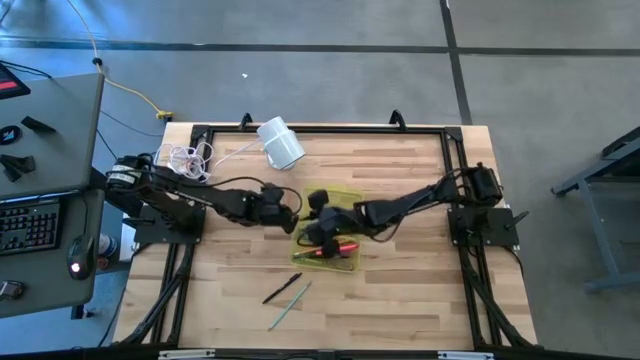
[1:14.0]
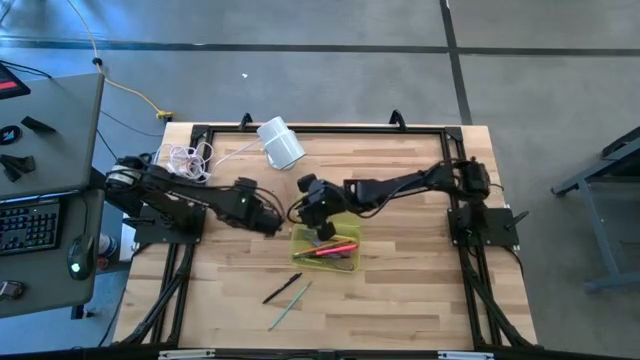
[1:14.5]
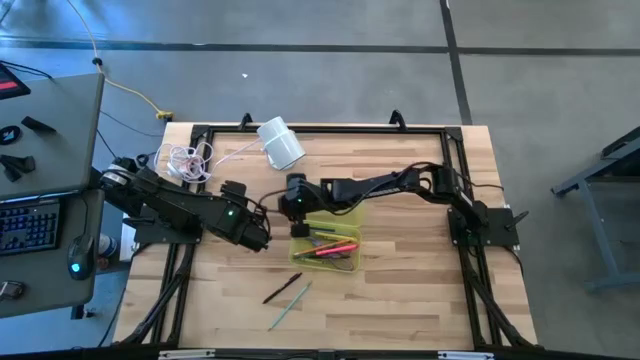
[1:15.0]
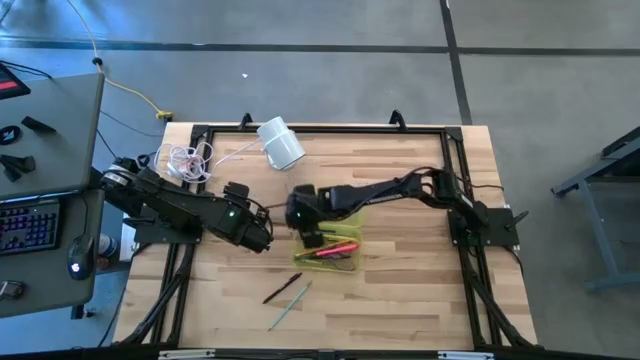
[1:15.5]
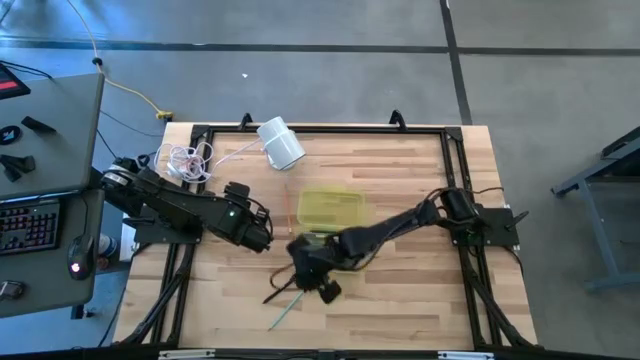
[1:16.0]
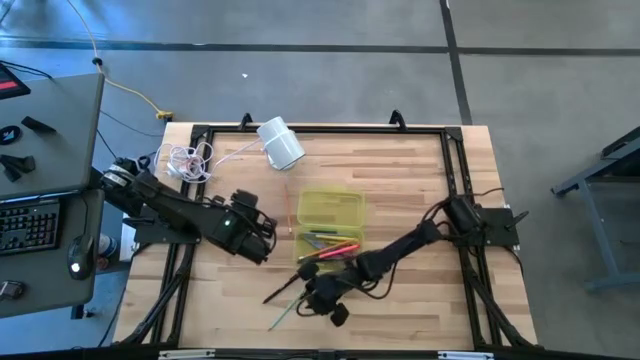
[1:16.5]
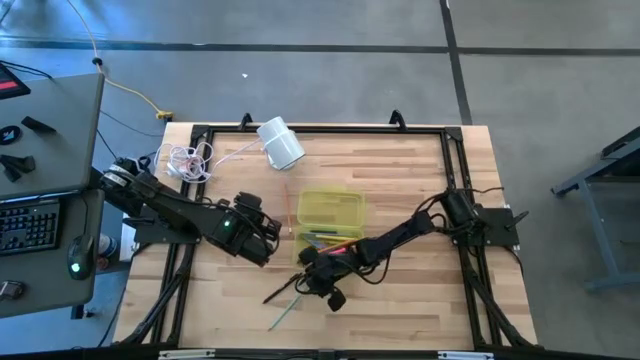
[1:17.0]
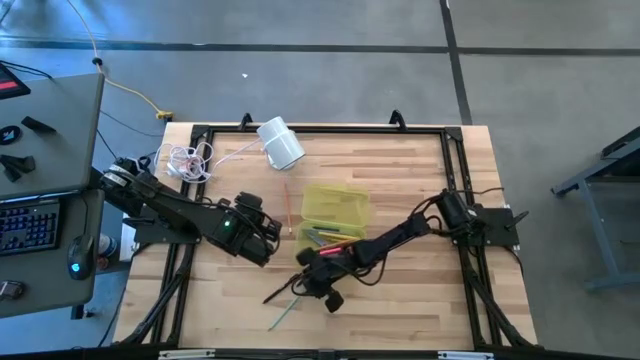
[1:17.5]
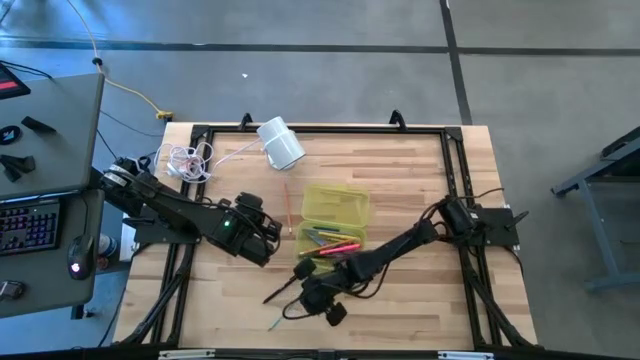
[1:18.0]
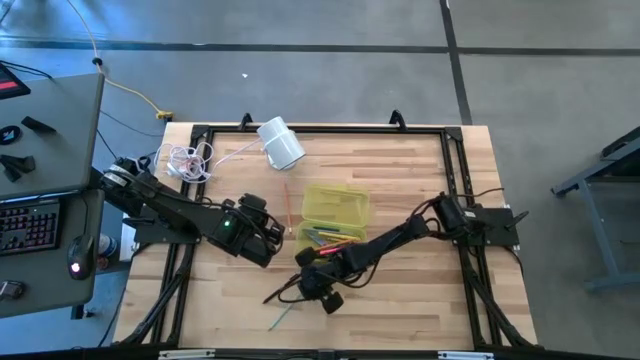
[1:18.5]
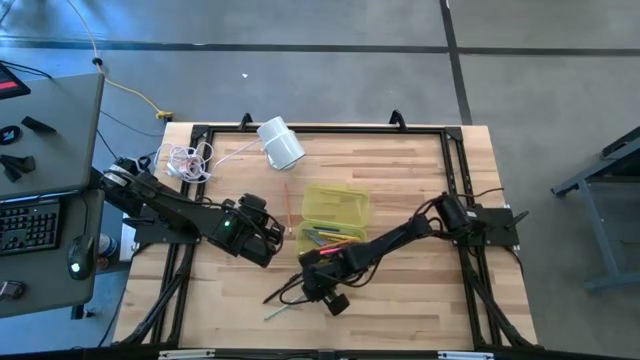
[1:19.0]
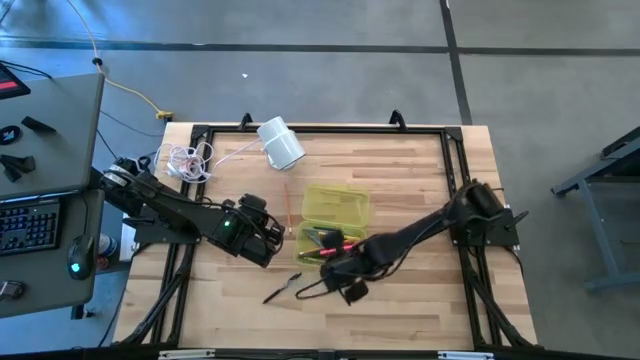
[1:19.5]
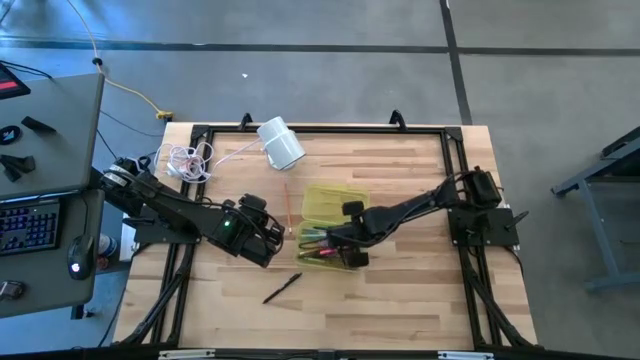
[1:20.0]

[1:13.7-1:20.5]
Task: Pick & place school supplies into a supply box
Put the light green pencil into the supply box

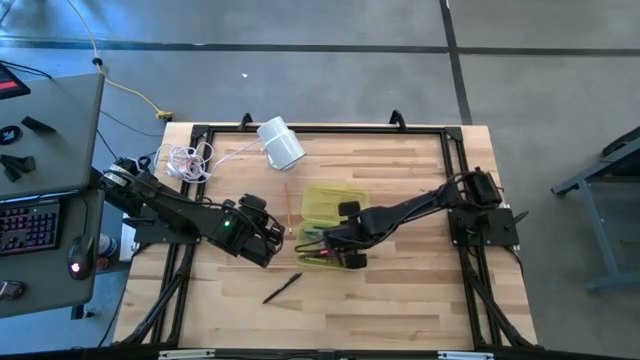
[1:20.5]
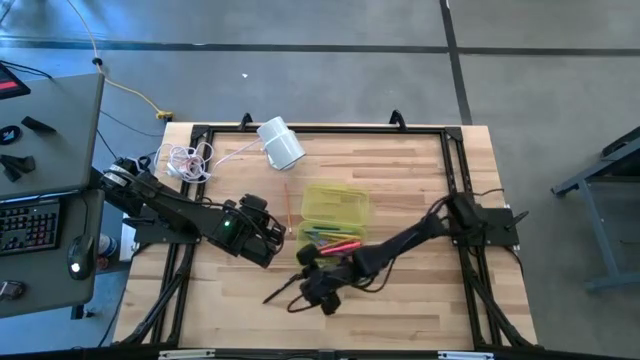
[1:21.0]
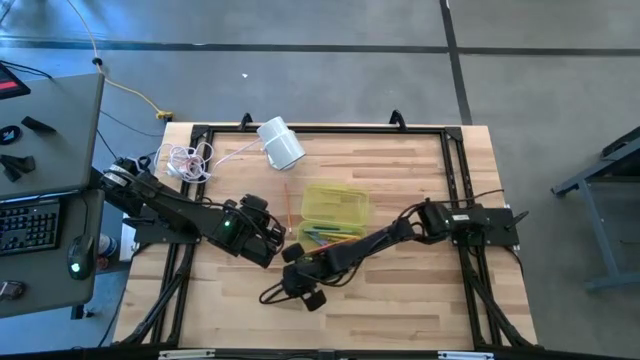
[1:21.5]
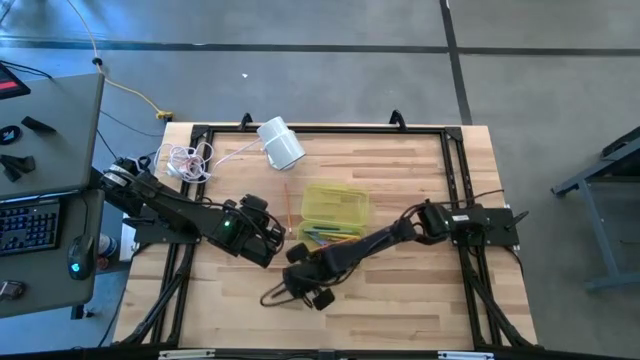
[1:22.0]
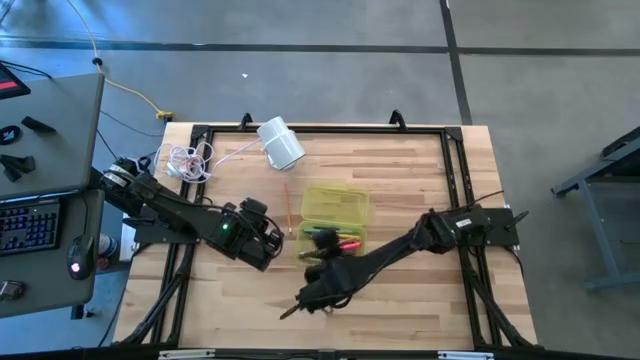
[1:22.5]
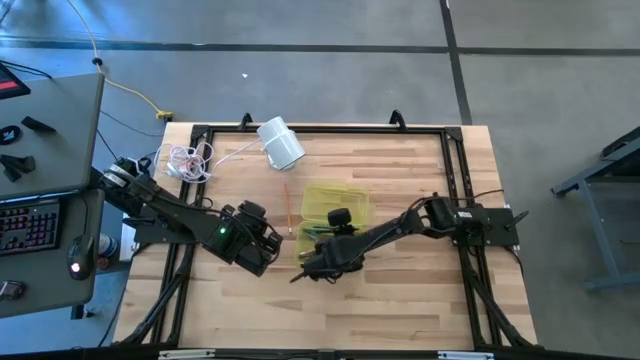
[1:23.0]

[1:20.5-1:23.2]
Put the black pen into the supply box

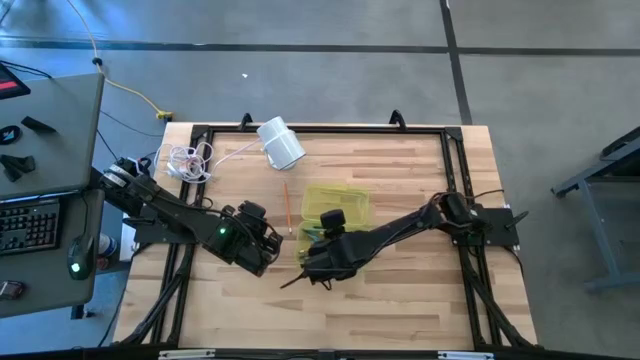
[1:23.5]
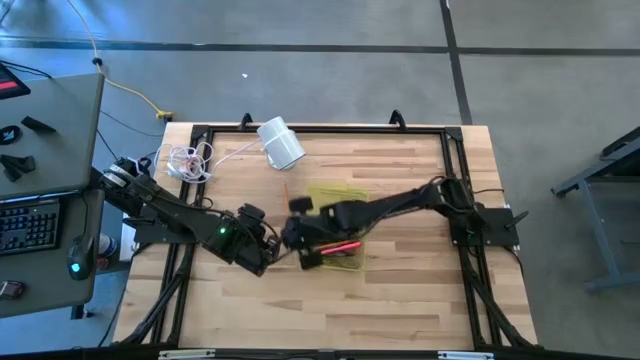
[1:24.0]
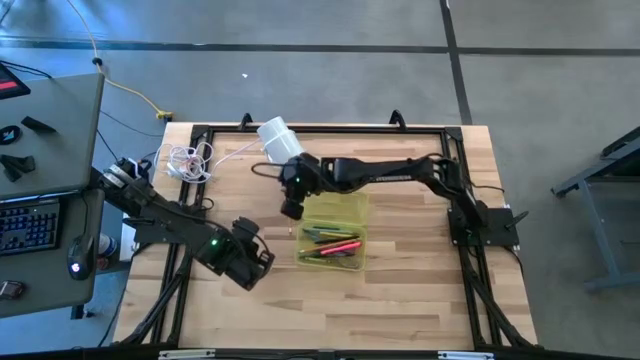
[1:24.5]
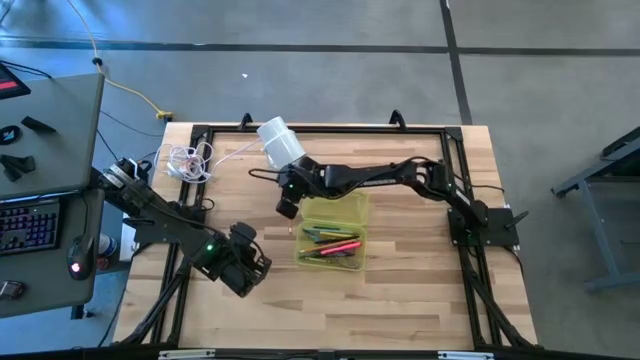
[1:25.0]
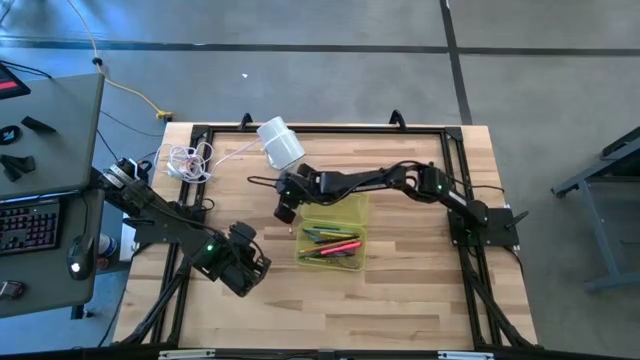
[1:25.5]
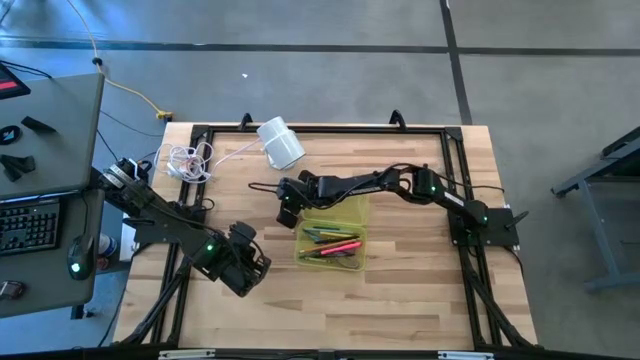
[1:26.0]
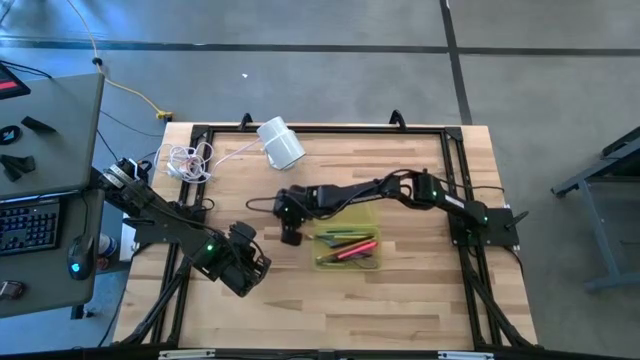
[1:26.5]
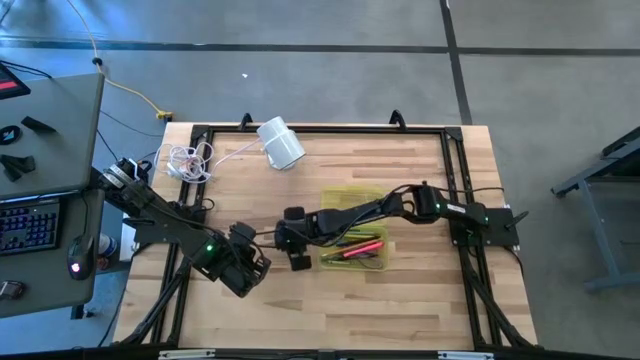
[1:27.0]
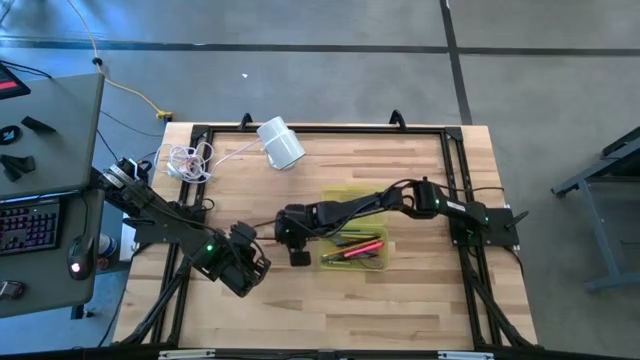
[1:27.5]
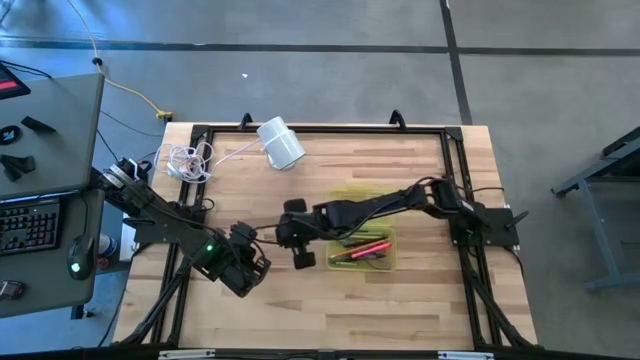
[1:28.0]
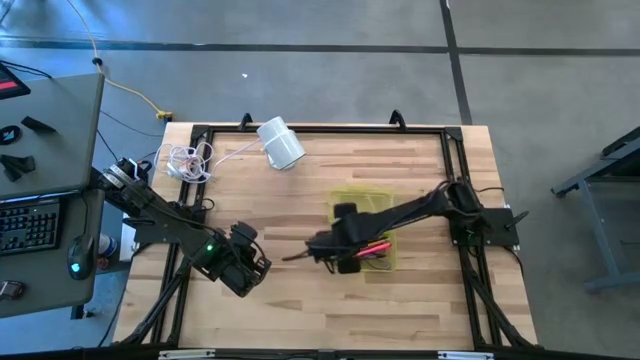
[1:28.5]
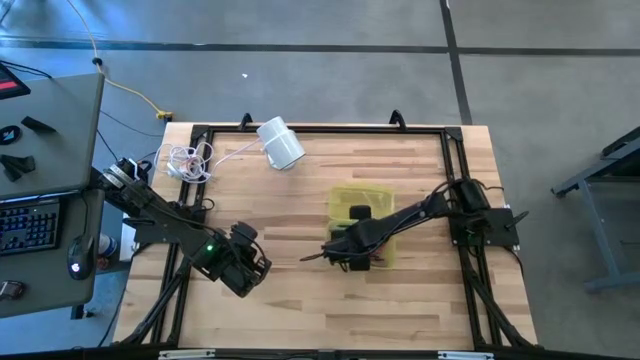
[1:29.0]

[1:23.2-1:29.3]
Put the orange pencil into the supply box

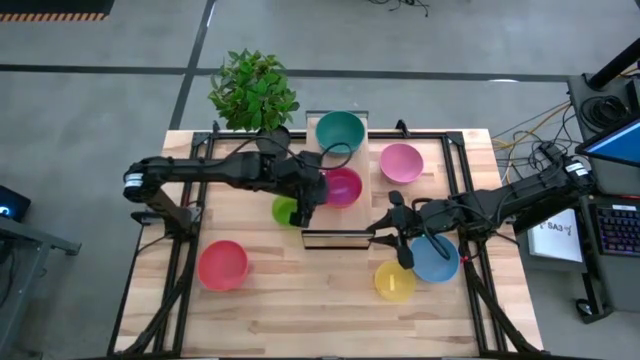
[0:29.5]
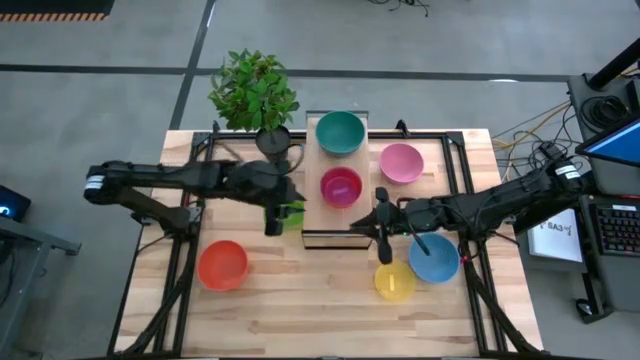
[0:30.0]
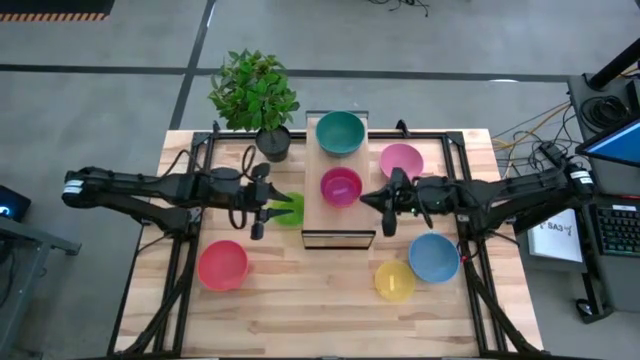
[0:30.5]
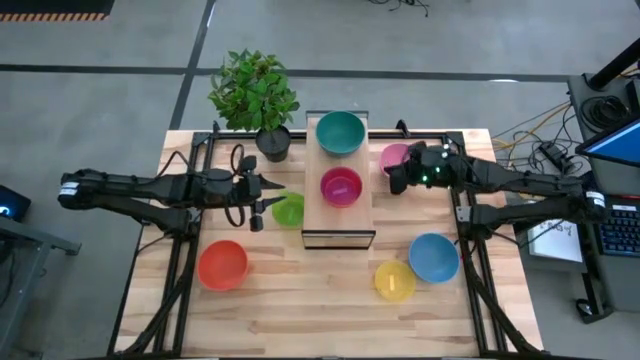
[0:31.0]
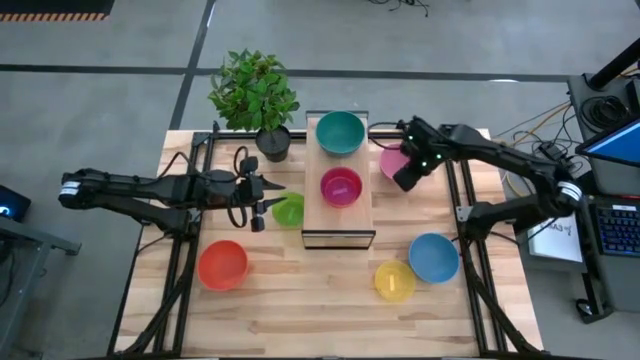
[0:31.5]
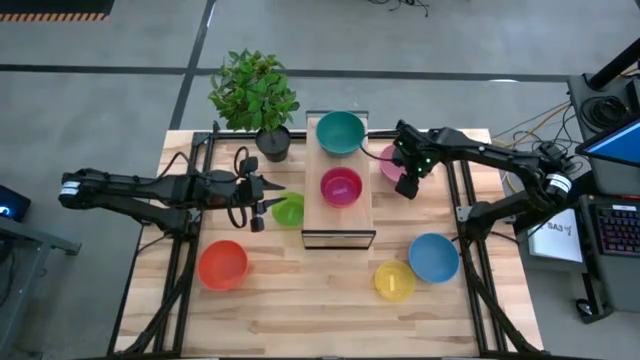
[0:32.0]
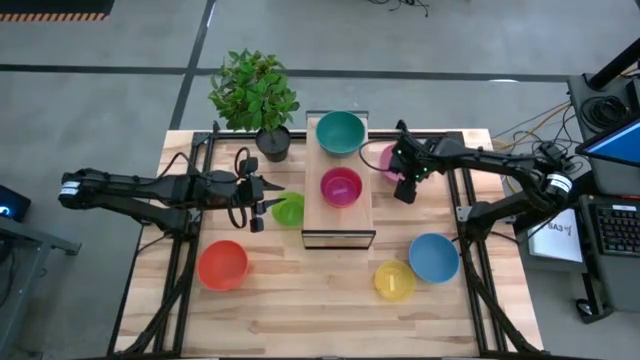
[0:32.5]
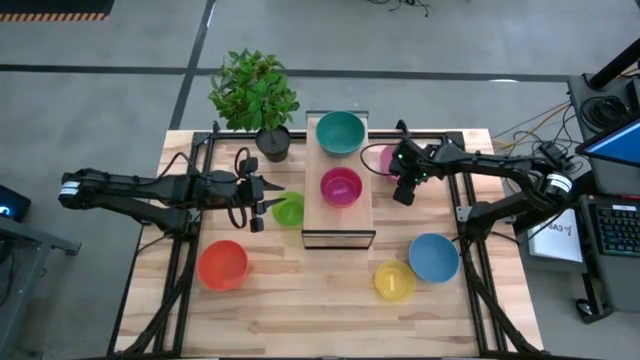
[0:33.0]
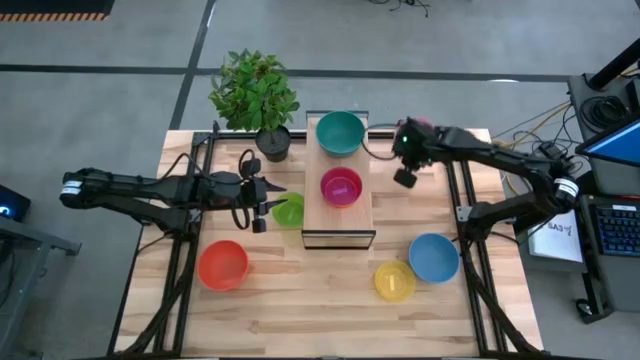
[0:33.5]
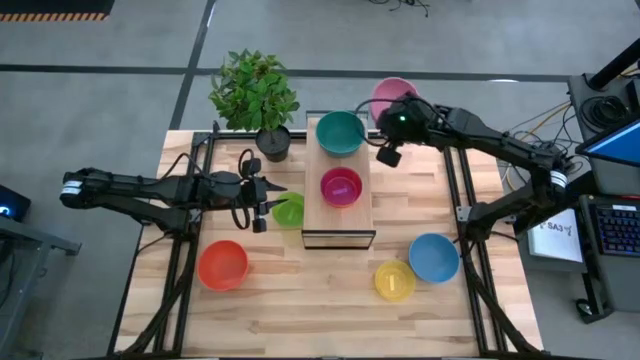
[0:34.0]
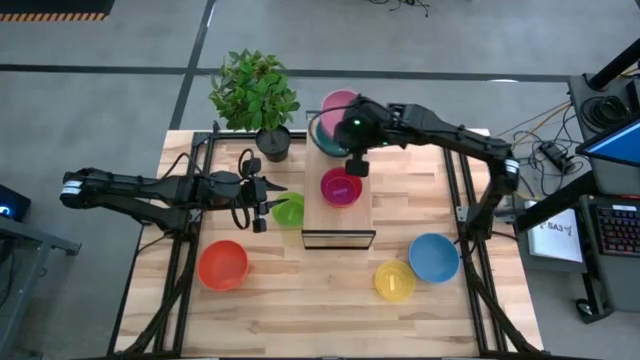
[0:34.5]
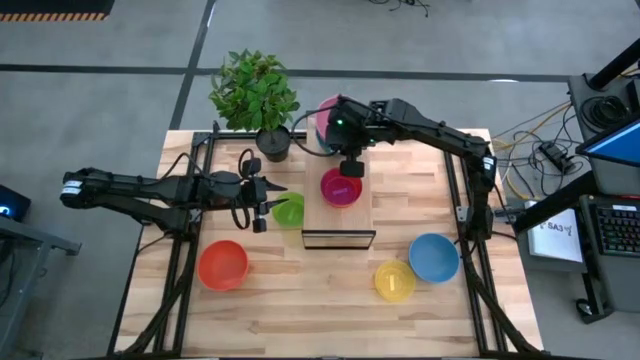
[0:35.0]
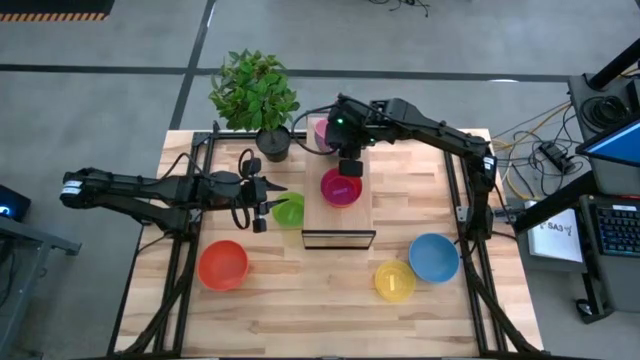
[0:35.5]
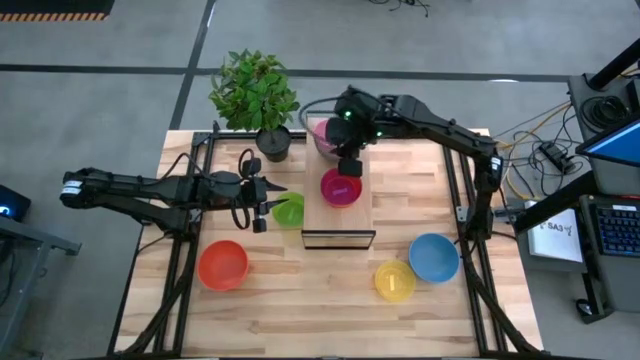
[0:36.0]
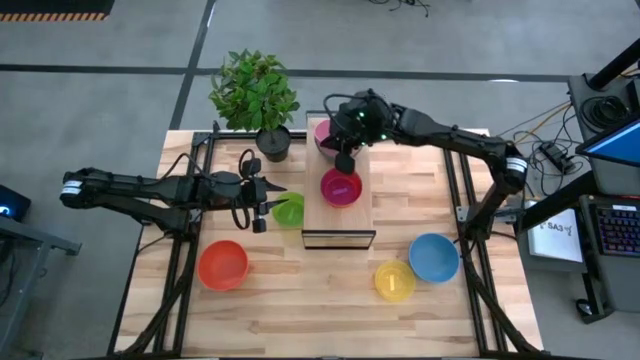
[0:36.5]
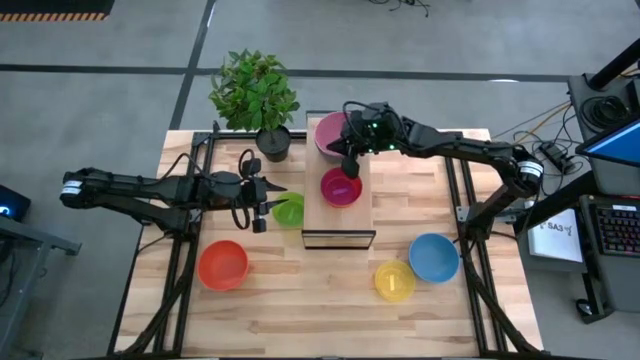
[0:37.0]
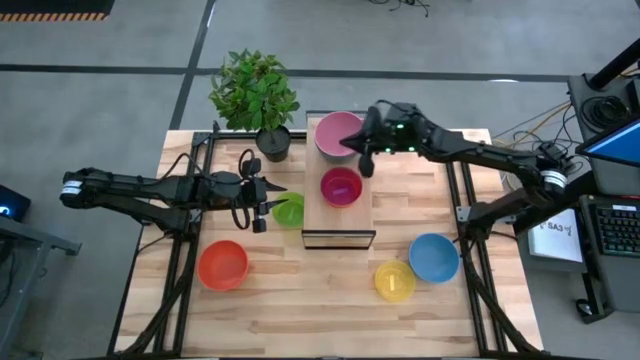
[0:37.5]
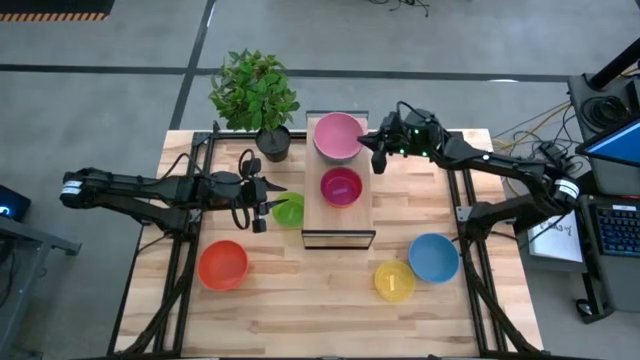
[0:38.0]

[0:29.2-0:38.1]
Task: Place and stack bowls onto a shelf
Stack the pink bowl into the blue bowl on the shelf
